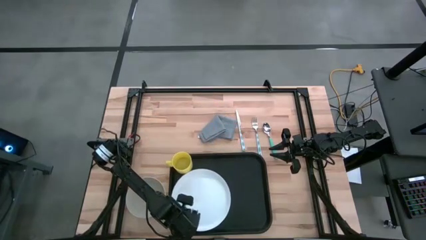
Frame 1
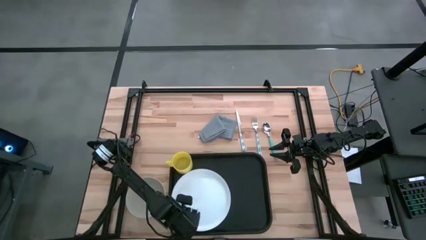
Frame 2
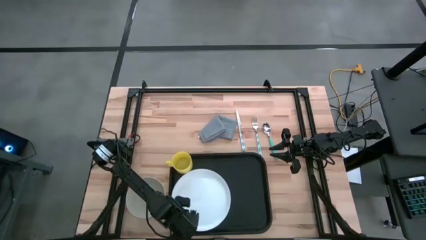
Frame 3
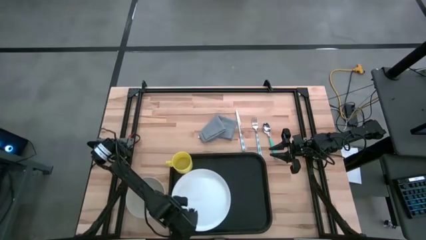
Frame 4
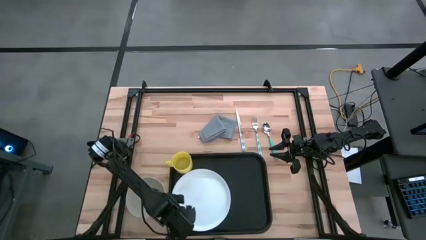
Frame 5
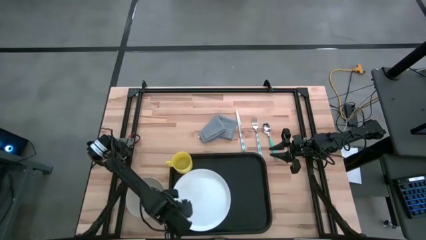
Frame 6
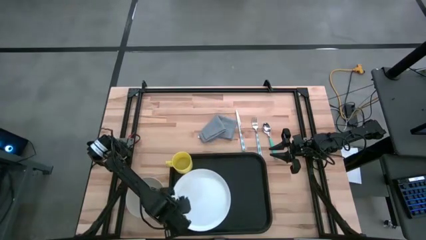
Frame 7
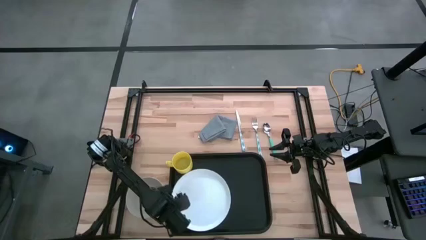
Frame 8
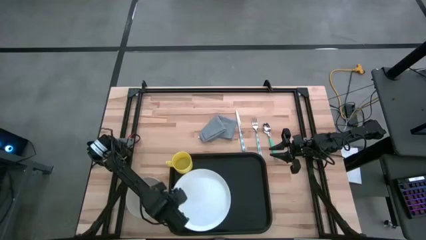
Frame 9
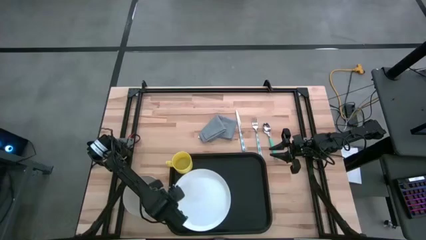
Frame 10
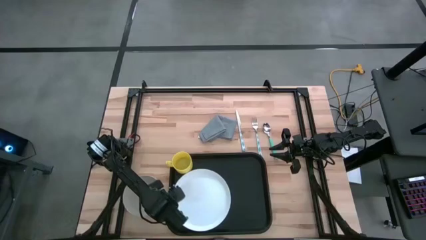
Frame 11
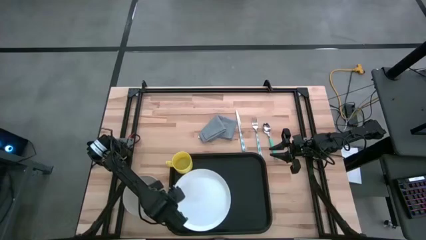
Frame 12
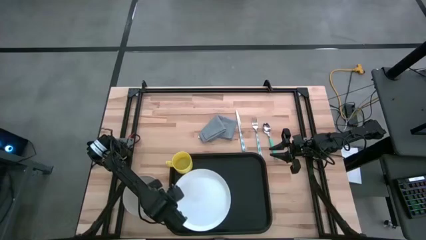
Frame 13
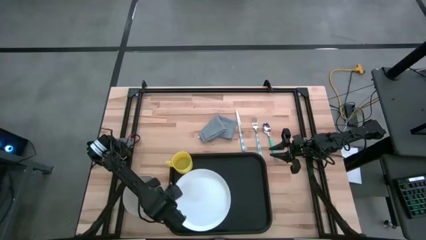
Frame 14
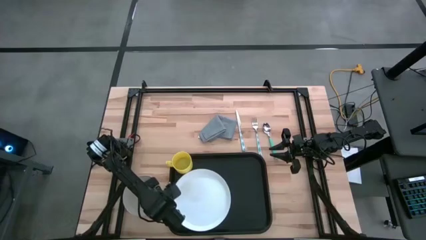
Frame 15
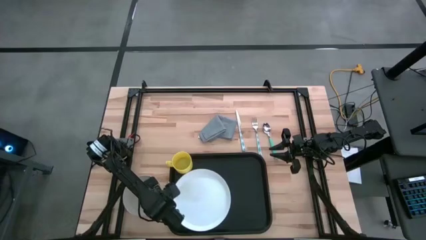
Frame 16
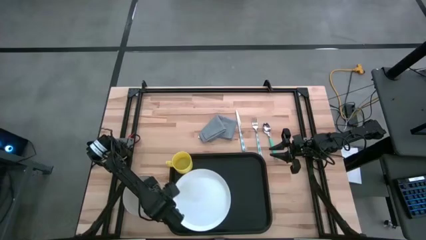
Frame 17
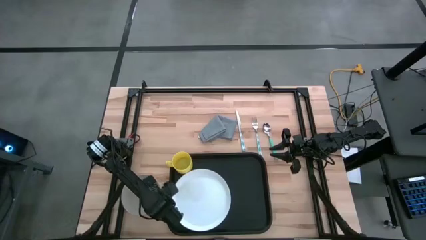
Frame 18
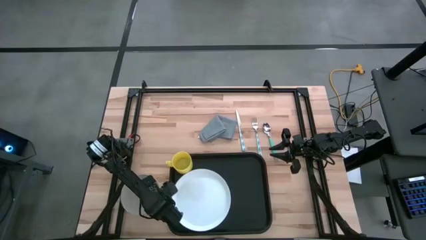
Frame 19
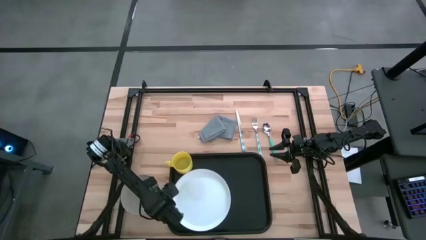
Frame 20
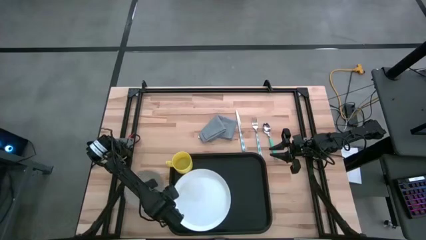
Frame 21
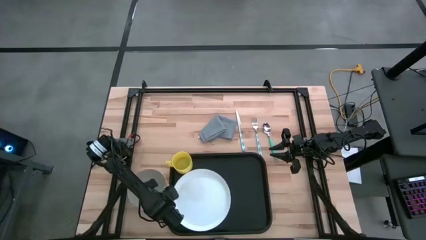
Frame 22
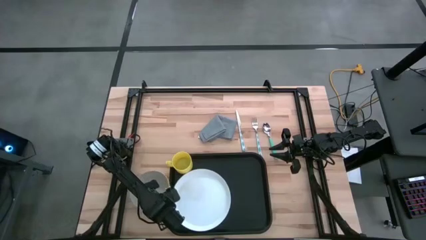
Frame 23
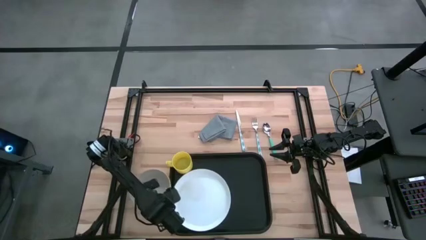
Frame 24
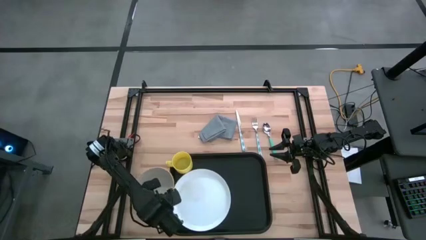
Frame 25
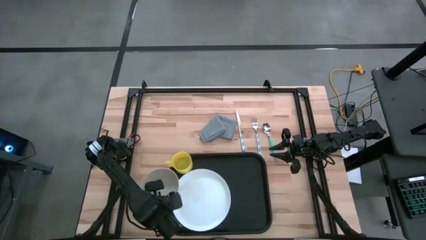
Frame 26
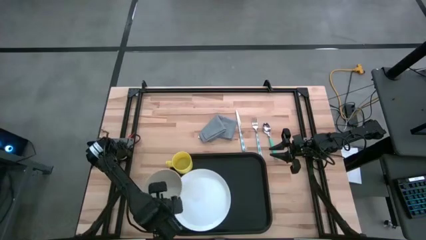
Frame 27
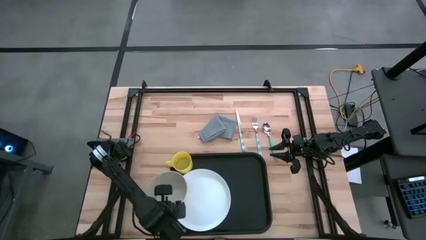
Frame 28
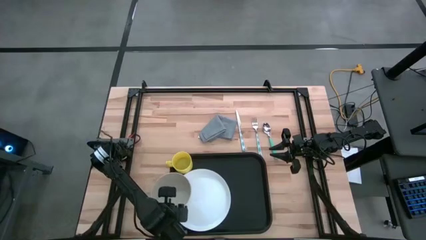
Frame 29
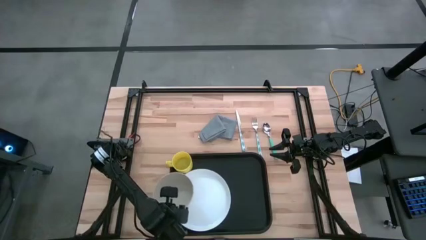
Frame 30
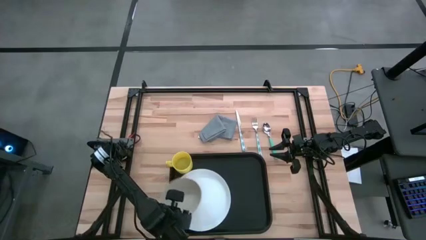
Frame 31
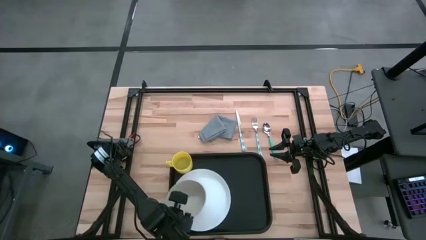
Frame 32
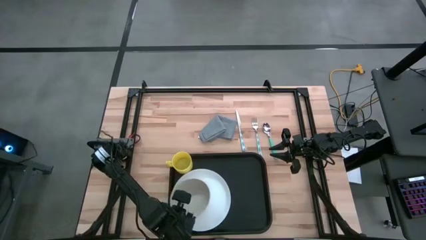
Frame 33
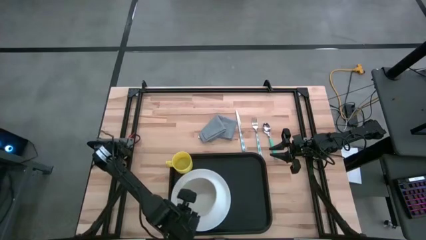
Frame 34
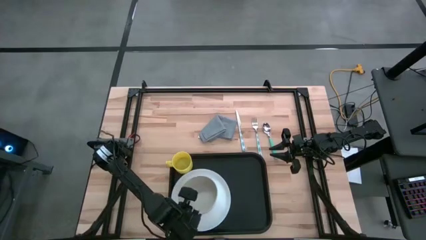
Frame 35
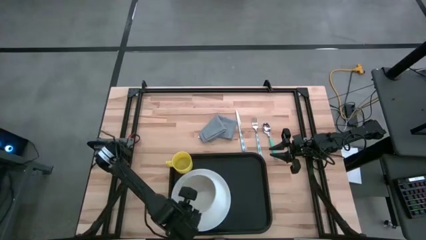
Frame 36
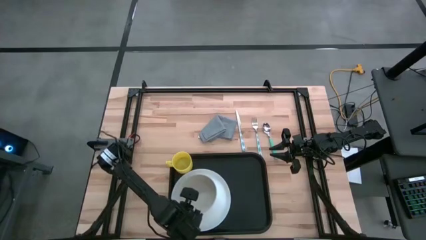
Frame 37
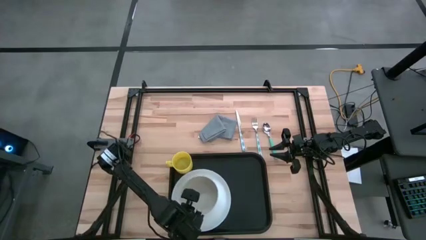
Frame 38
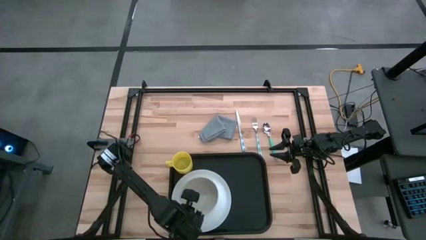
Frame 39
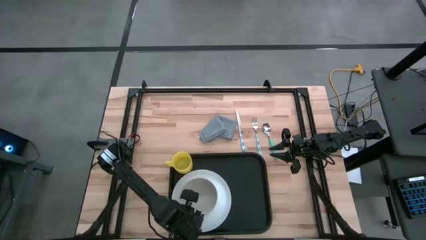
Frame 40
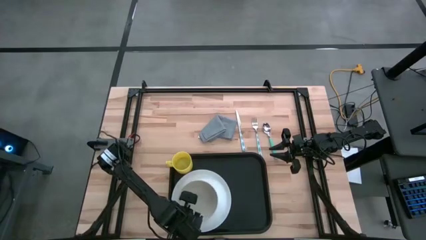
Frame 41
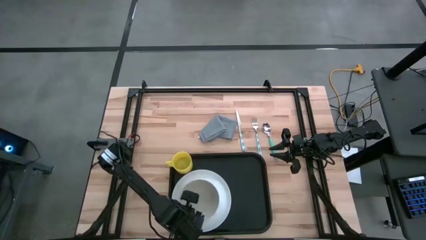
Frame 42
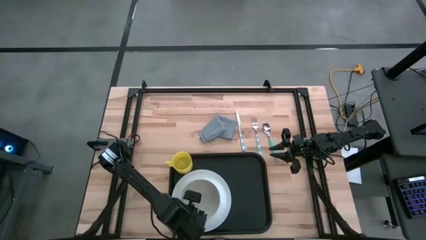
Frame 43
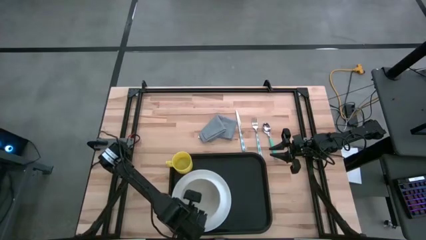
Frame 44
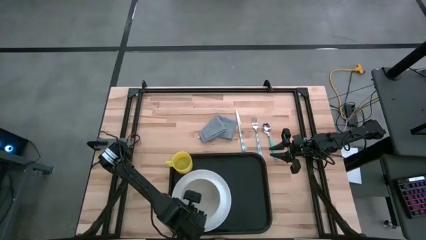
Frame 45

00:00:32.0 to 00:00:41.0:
Task: Set up tray
Put the brown bowl on the white plate

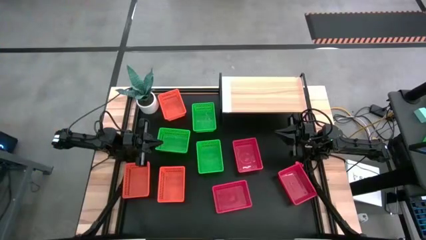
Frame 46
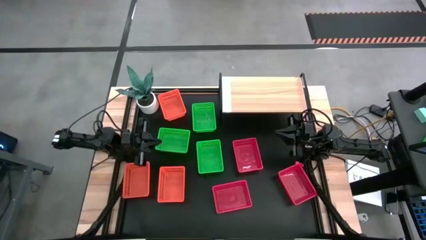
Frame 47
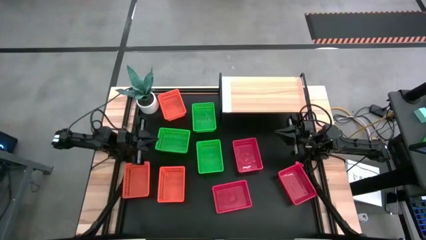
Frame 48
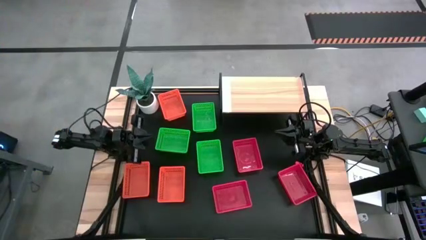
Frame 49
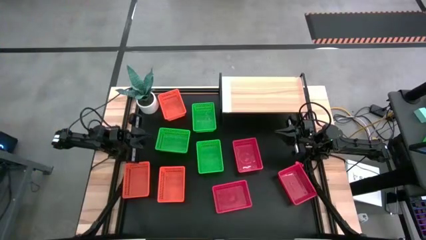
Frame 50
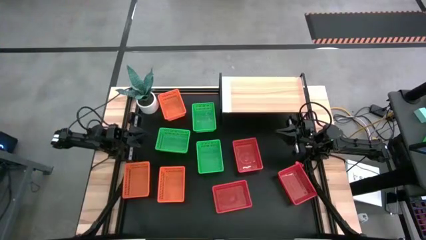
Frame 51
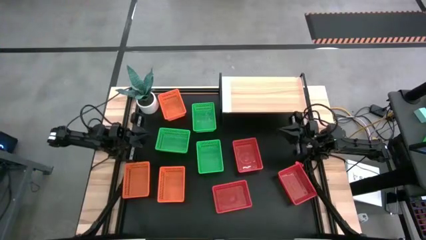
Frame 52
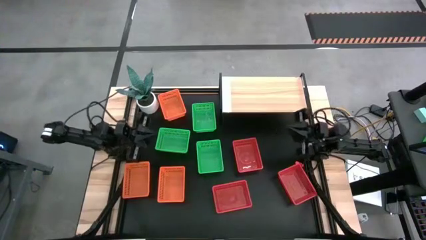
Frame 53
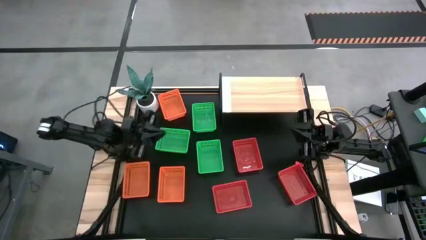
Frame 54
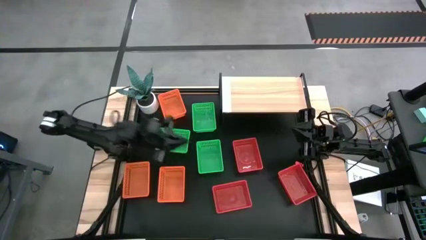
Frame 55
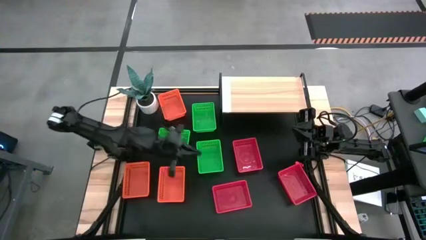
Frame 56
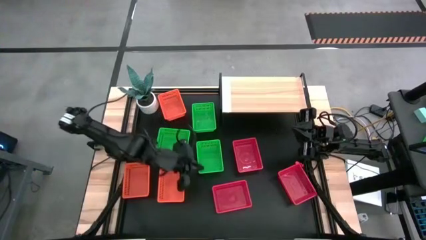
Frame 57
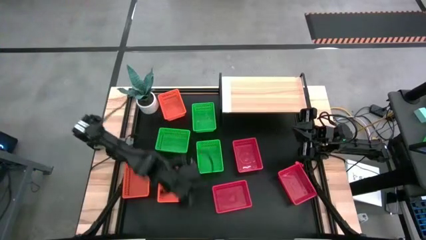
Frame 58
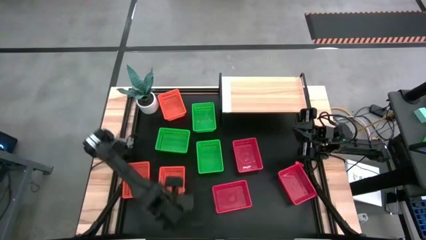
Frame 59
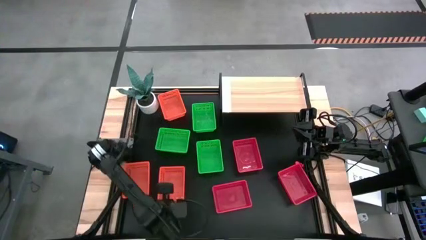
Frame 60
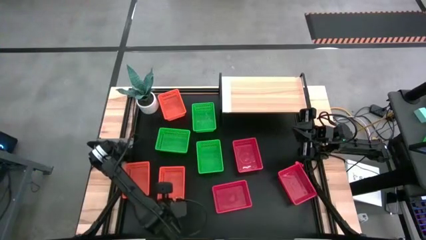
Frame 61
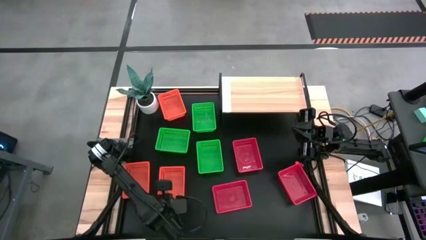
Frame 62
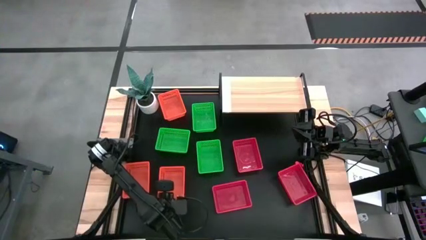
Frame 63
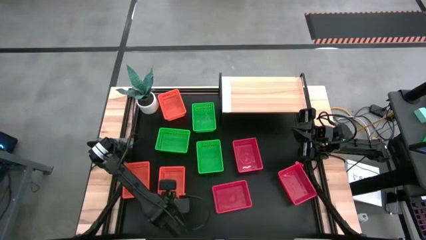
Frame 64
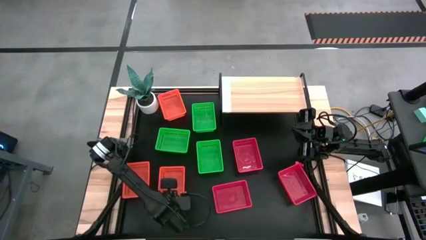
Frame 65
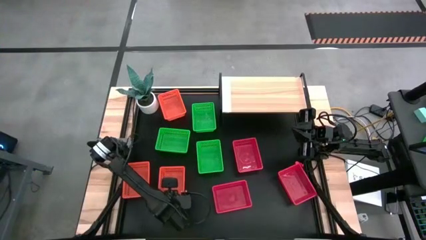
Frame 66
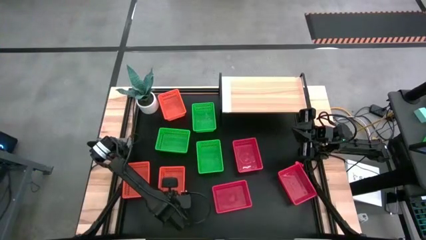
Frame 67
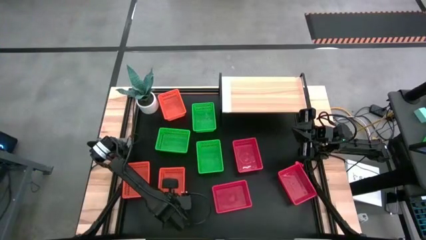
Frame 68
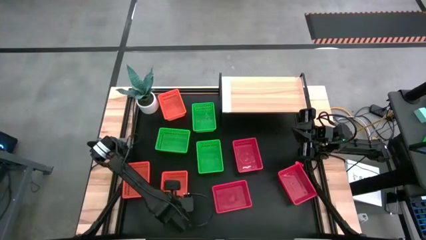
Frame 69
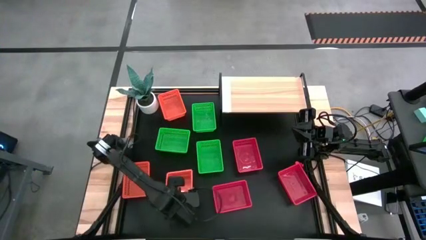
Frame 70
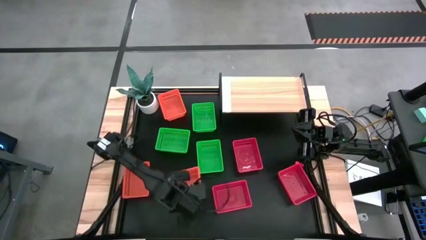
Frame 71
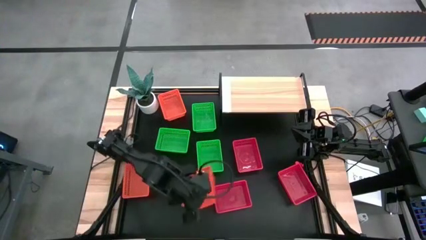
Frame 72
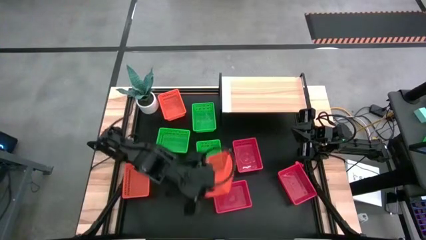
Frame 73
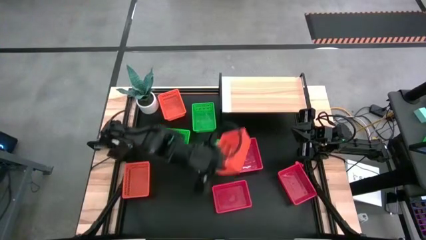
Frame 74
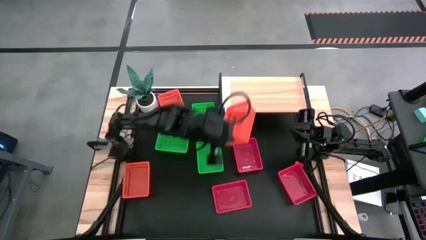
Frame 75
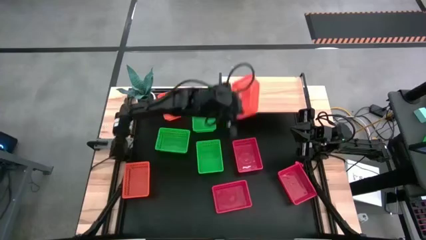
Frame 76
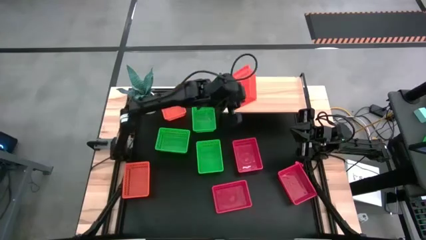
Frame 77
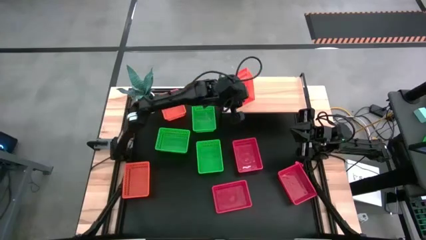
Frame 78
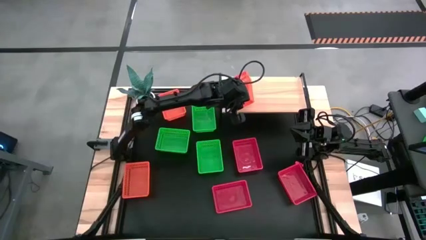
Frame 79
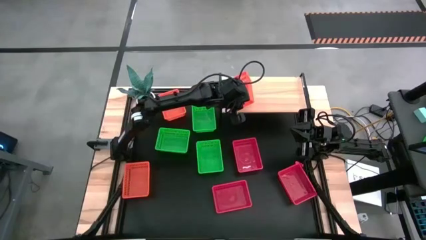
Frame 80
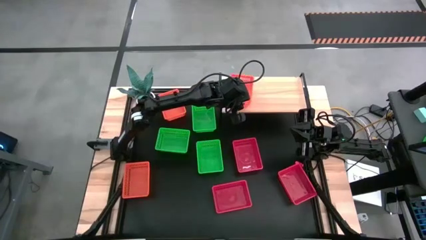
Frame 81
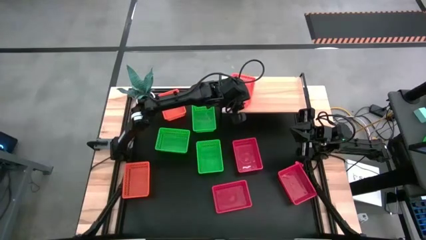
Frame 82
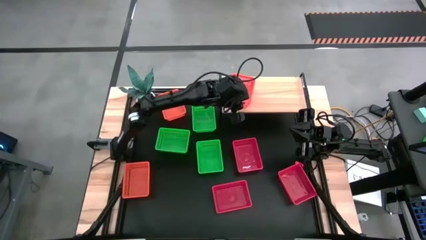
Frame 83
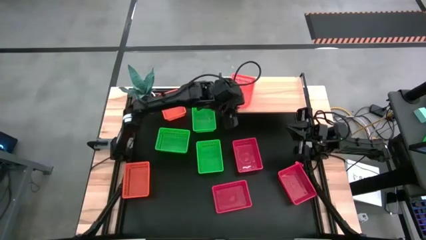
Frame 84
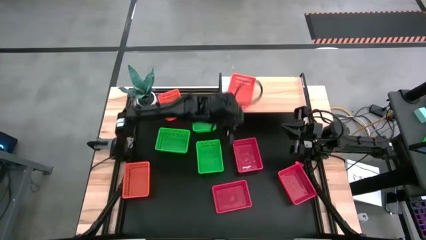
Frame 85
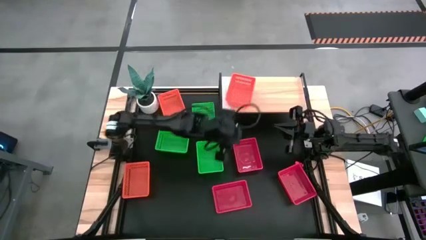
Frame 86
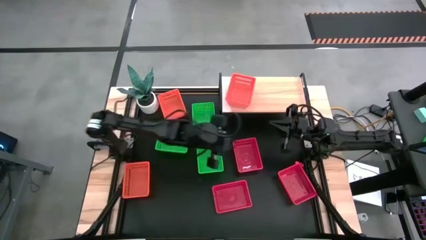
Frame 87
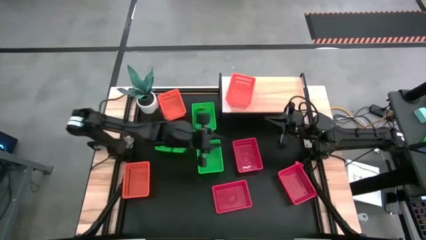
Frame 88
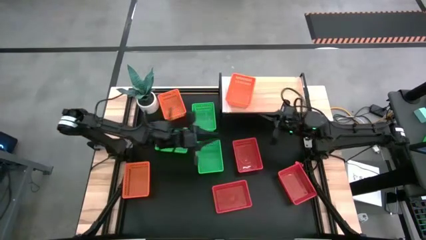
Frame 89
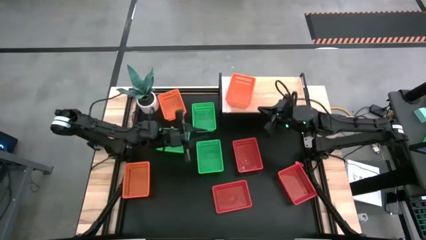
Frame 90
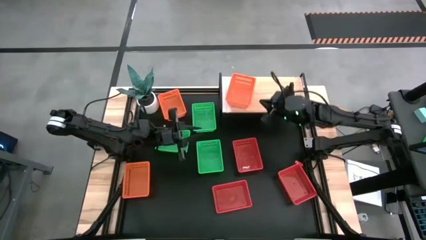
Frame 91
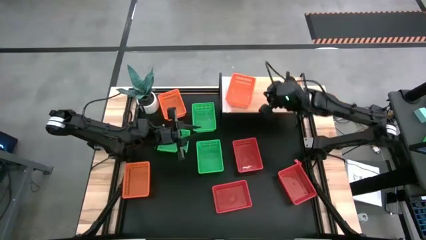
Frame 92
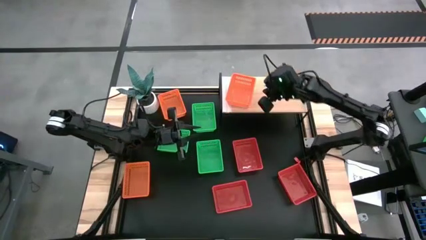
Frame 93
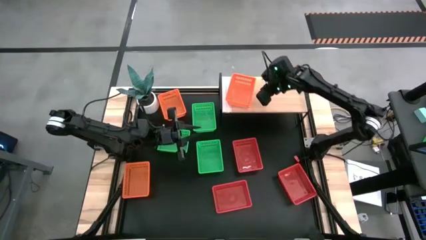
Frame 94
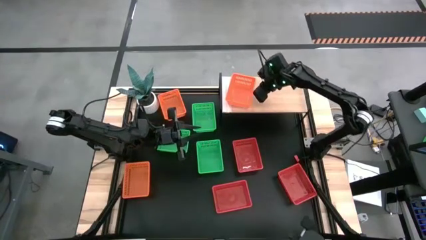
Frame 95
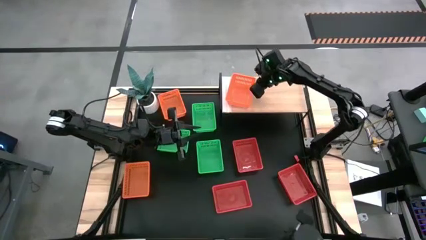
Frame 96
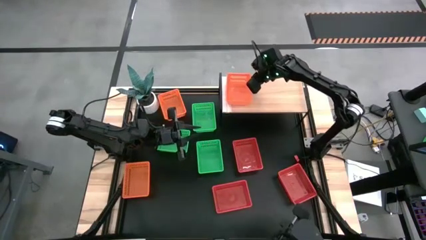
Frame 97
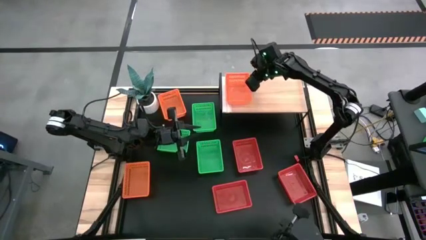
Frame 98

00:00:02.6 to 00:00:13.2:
Task: Stack baskets on shelf by color
Put the bottom right orange bin on the shelf
